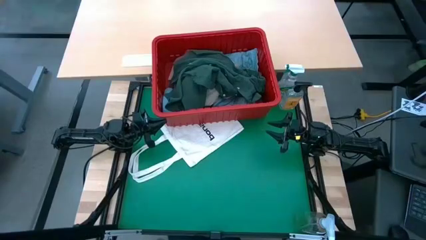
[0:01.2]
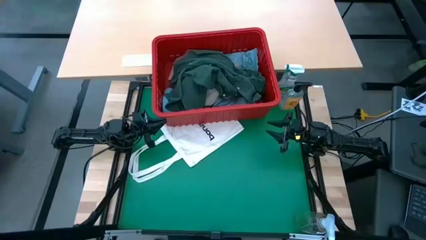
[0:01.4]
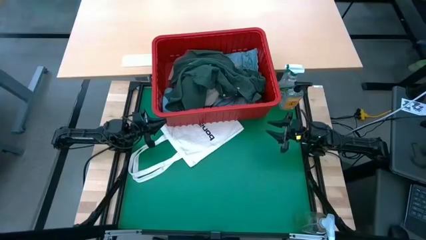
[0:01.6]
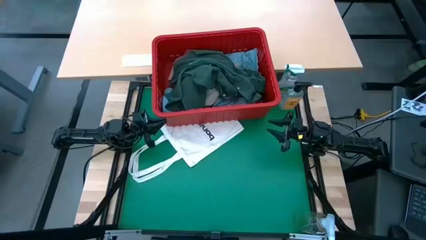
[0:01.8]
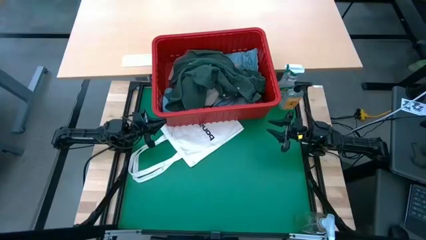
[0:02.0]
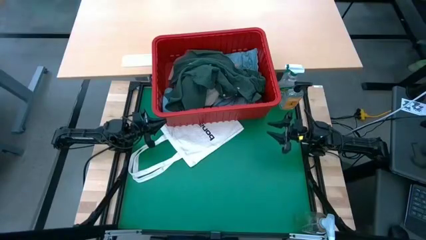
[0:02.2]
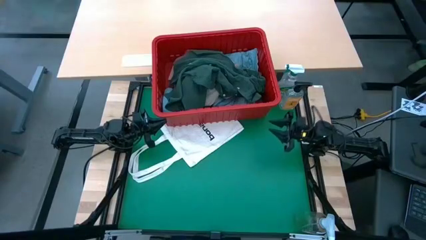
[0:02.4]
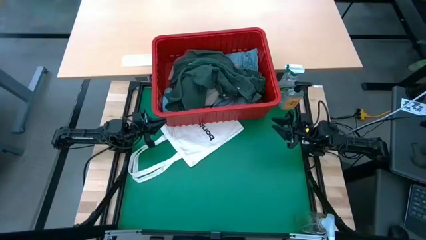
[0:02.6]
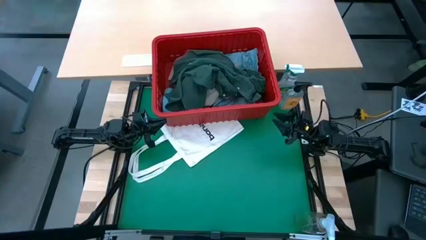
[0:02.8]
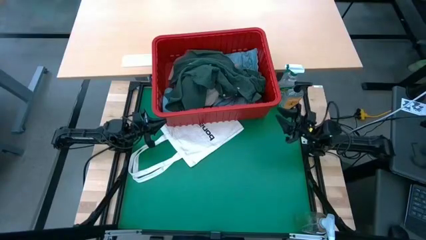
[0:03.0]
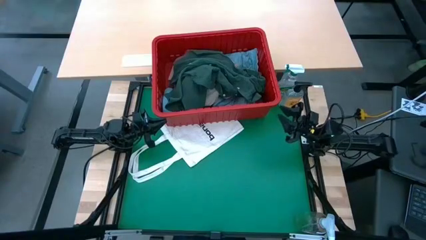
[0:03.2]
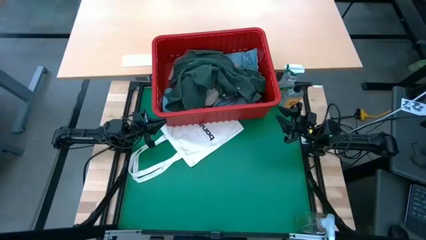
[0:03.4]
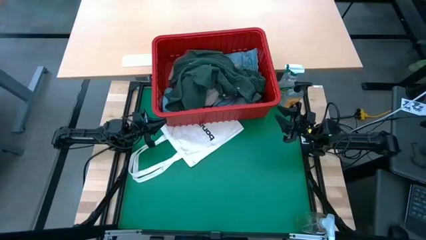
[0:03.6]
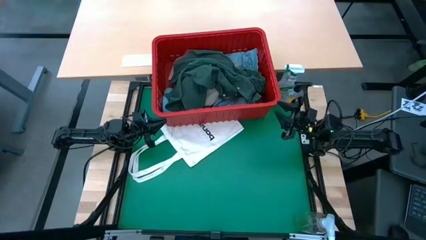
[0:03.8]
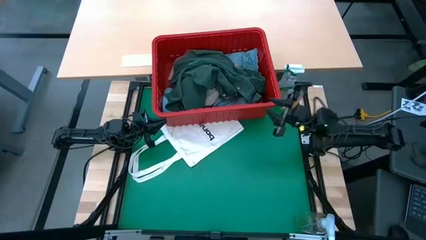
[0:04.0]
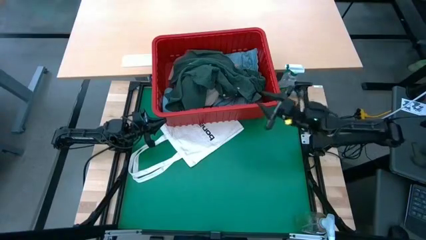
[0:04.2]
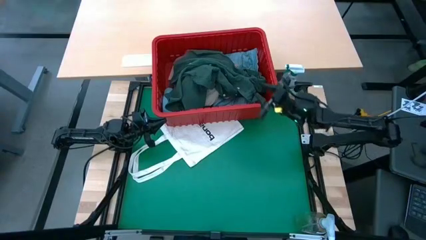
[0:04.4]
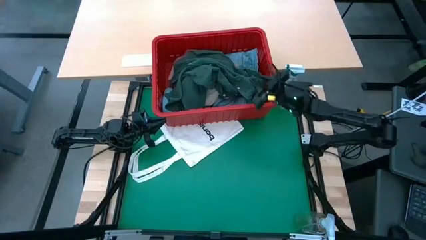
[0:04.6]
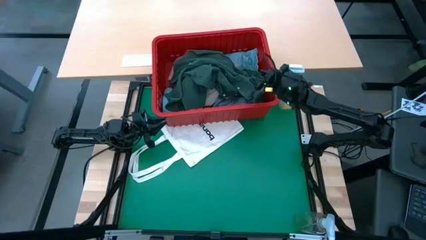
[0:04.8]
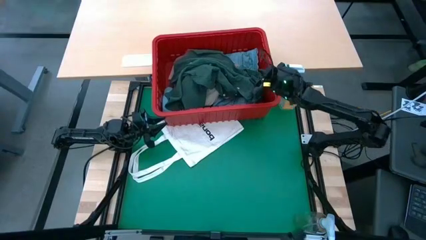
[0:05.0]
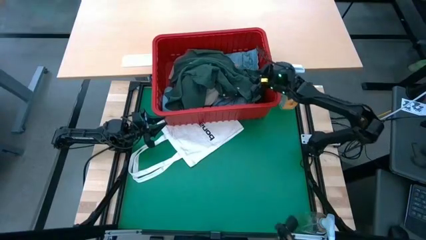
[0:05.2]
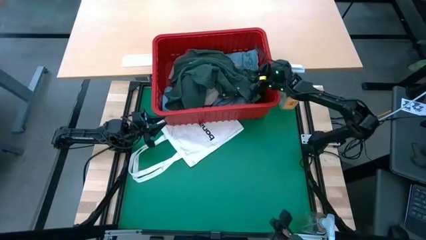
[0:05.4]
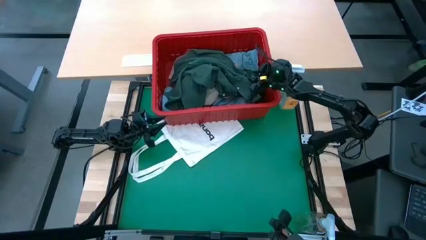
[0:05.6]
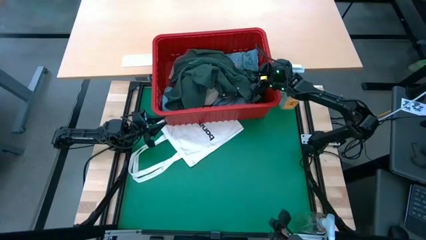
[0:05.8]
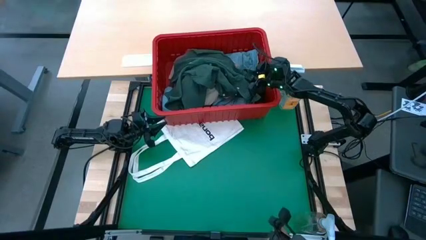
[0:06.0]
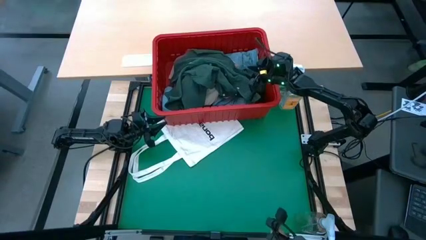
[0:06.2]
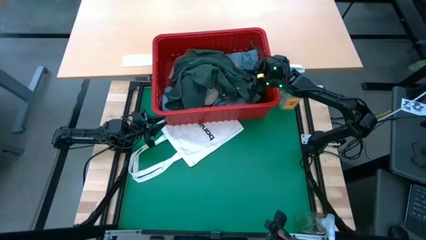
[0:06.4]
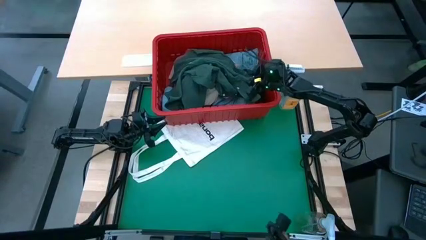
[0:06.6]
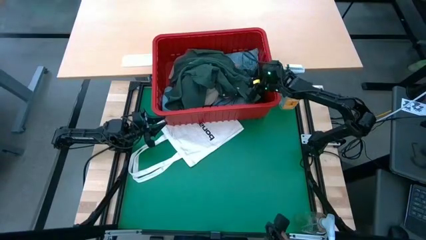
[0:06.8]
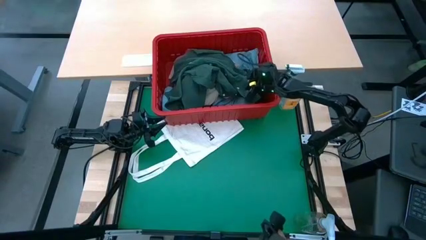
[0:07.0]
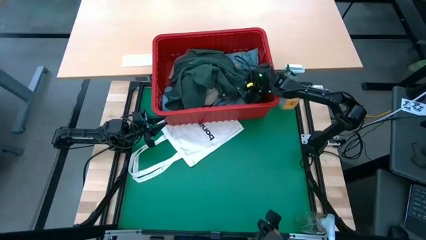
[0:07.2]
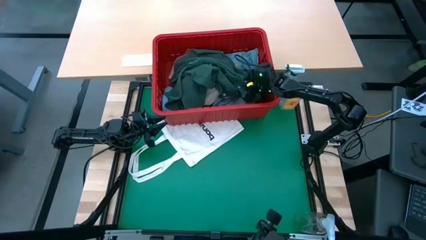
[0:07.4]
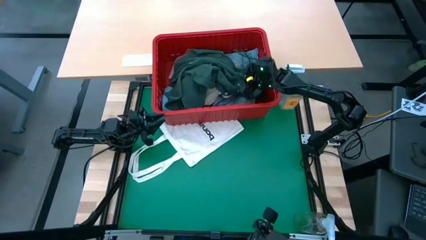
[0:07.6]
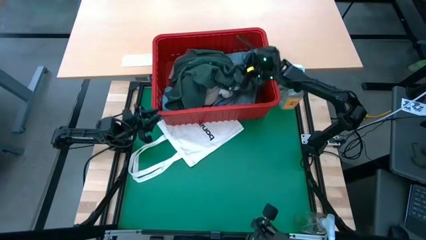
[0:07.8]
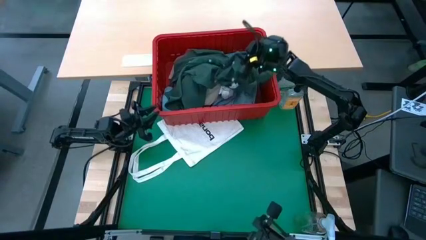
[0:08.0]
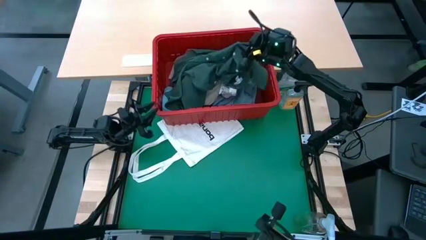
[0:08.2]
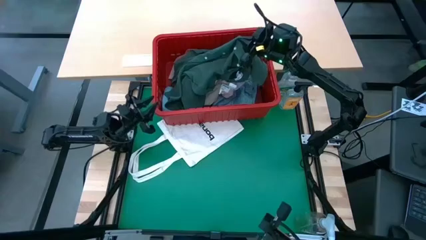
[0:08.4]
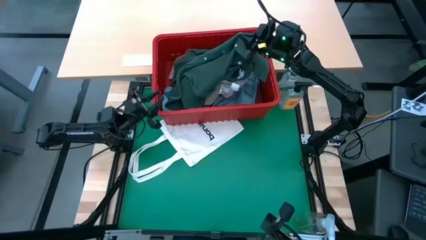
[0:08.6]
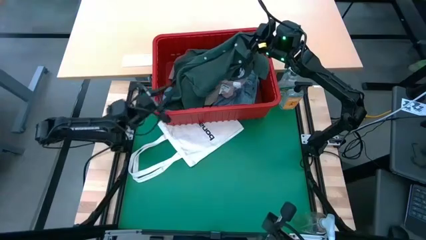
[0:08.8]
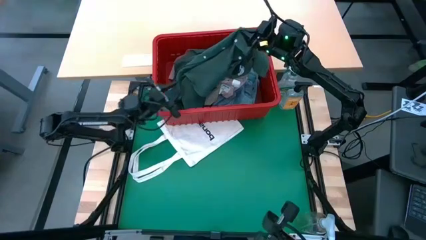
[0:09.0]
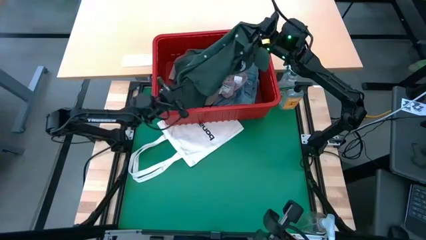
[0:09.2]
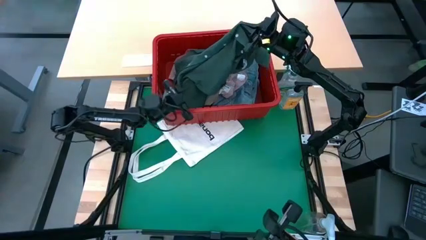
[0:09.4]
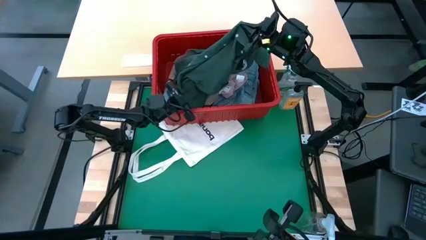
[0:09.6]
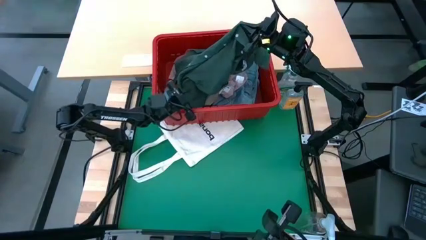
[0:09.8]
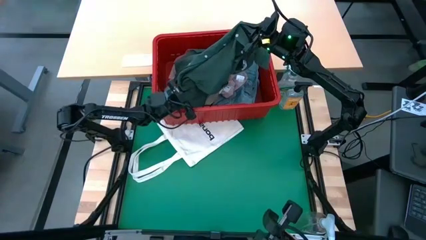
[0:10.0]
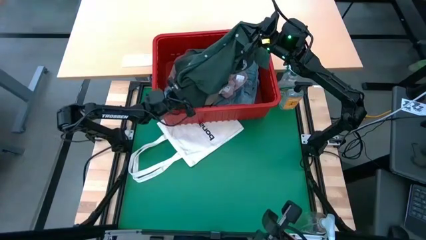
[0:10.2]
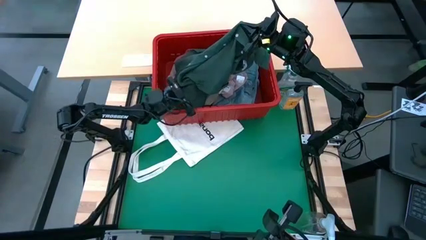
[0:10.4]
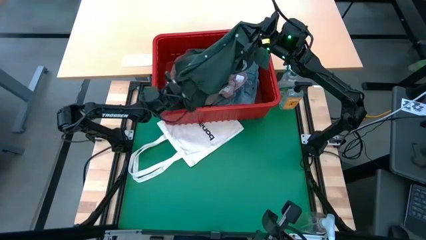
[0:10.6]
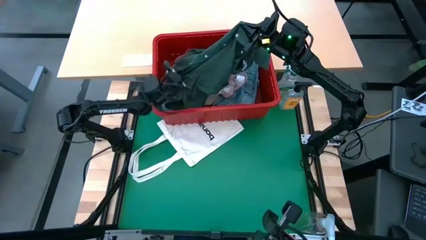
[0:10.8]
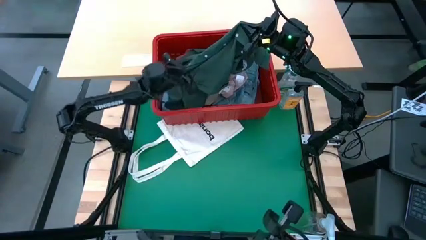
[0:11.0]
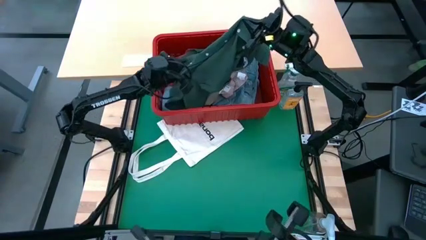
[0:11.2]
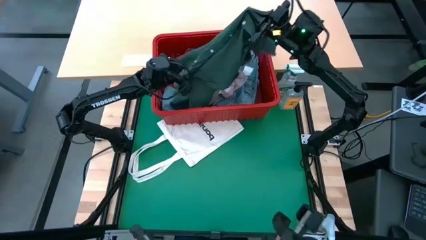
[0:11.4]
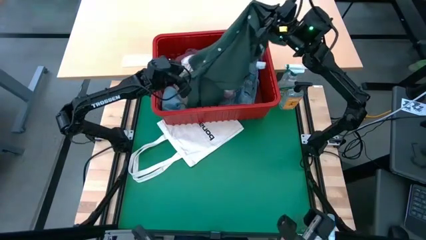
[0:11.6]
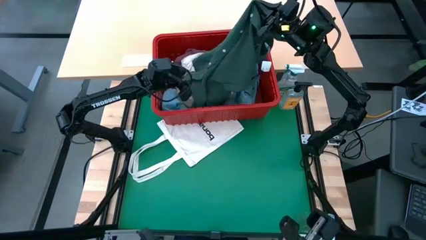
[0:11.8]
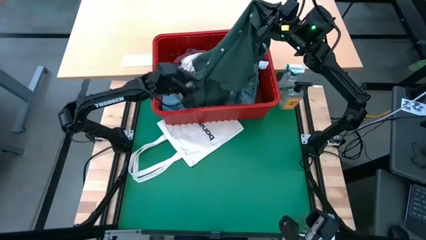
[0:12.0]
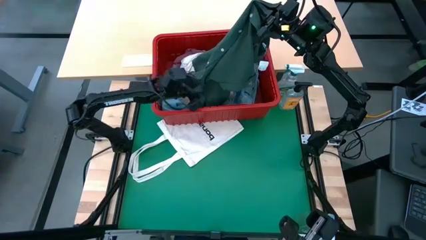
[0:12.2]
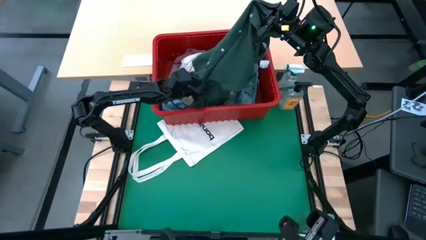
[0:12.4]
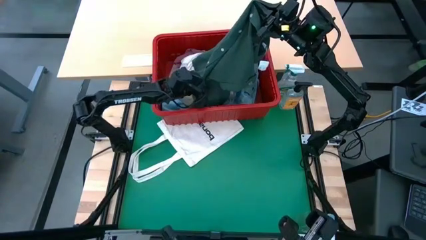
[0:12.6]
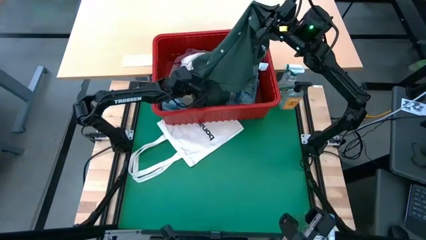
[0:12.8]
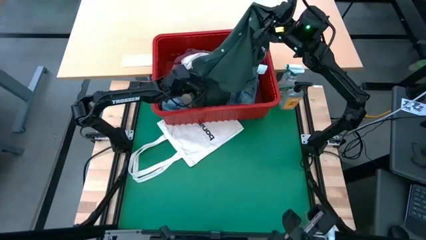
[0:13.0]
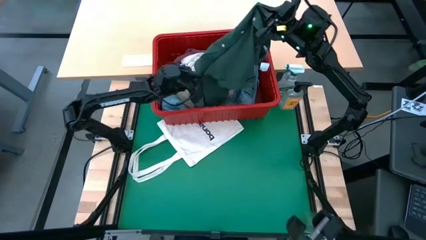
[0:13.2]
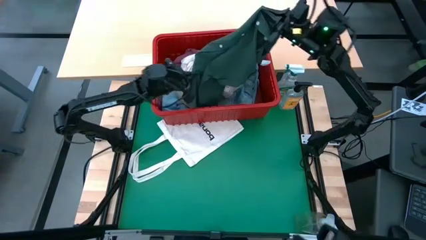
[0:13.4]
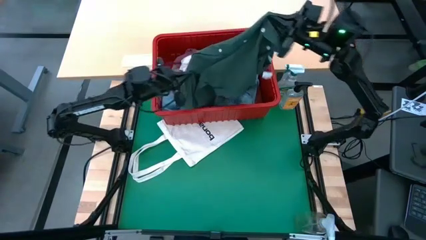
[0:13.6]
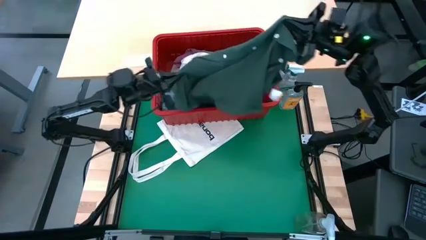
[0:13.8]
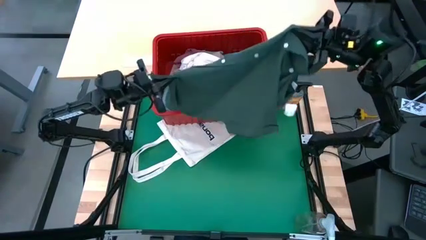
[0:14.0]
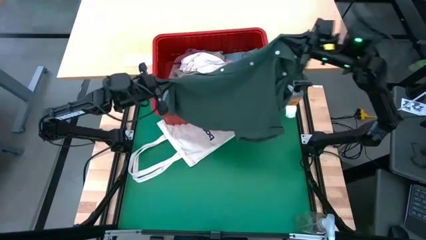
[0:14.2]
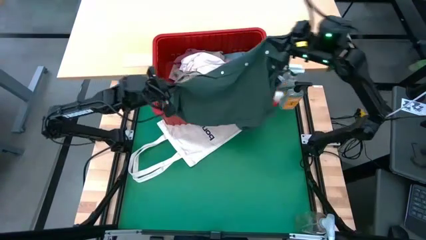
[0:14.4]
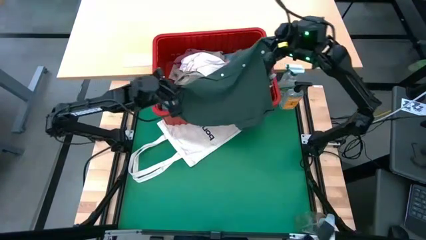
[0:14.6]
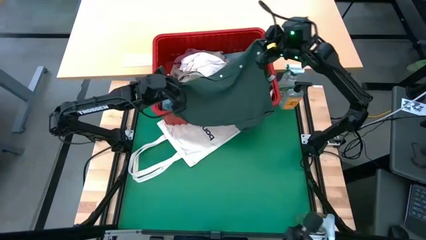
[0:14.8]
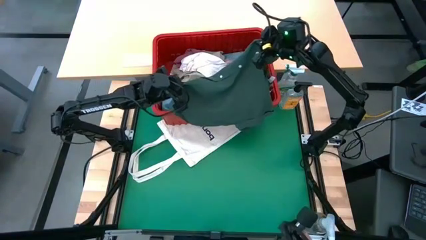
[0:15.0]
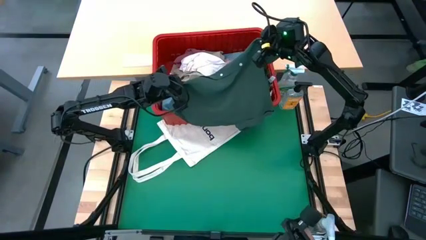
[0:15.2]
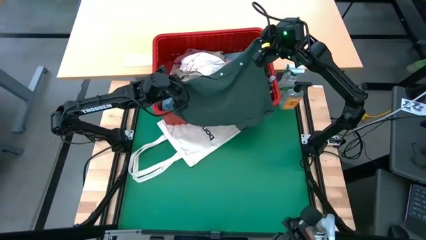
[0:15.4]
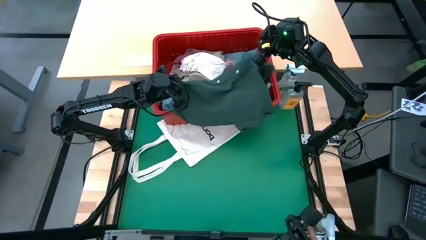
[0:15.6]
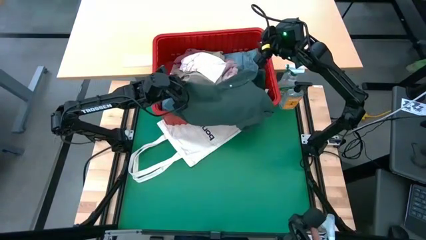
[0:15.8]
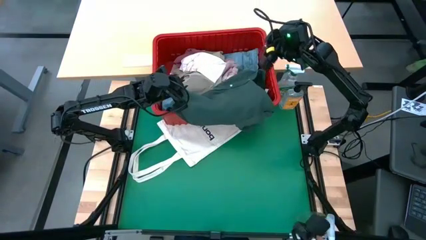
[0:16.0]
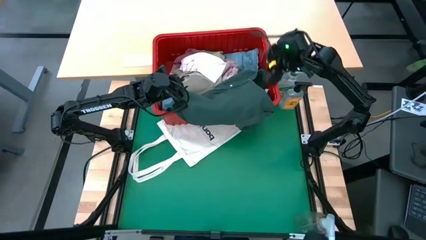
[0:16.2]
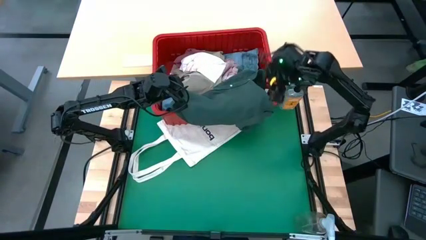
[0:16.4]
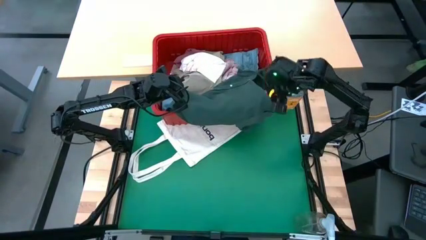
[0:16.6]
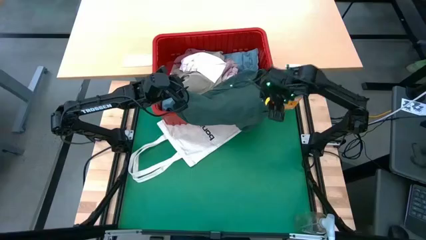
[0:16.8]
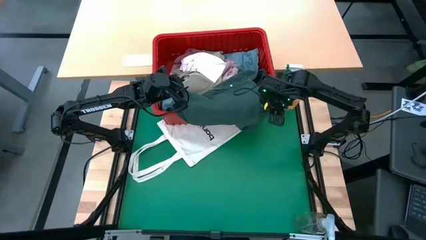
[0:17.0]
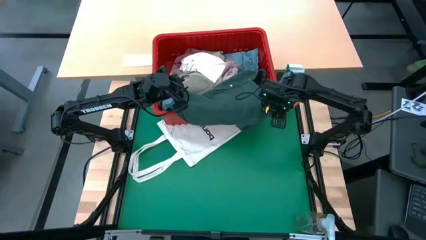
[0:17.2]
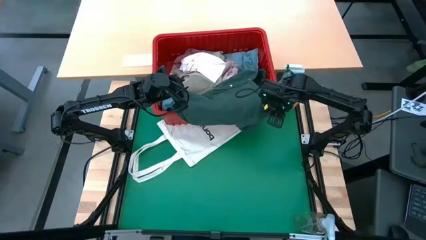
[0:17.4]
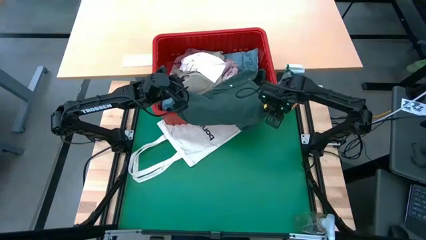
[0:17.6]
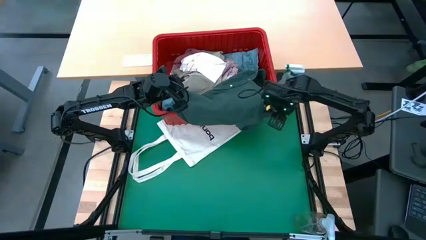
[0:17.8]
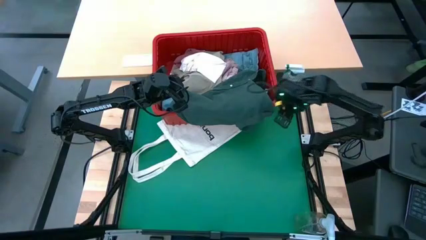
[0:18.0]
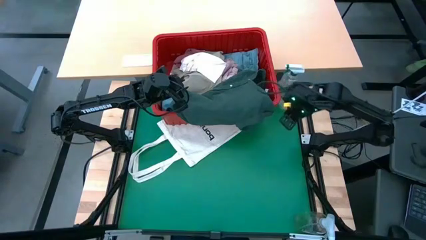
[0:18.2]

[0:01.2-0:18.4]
Task: Fold laundry
Fold the green shirt
